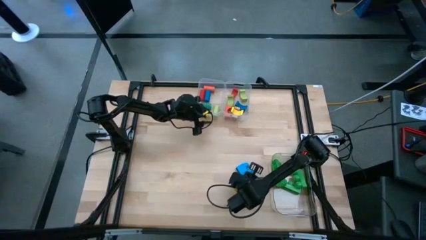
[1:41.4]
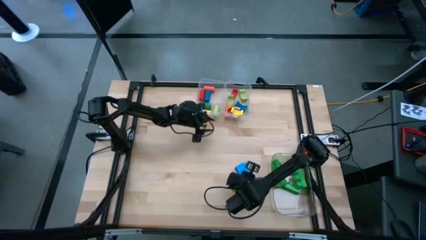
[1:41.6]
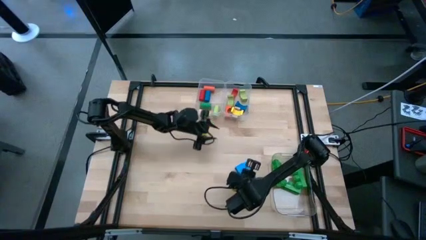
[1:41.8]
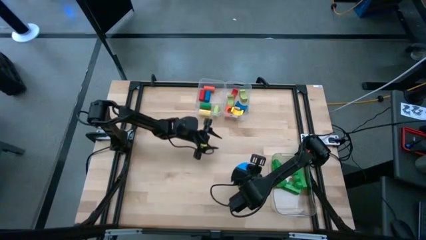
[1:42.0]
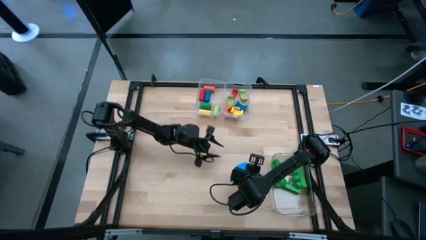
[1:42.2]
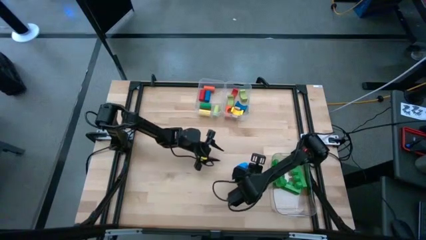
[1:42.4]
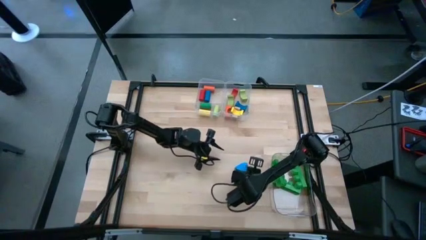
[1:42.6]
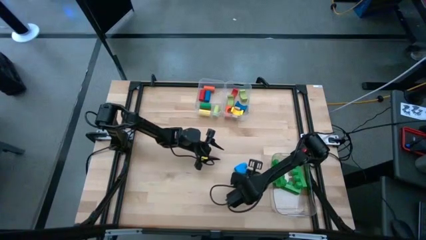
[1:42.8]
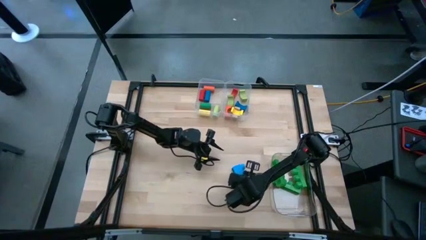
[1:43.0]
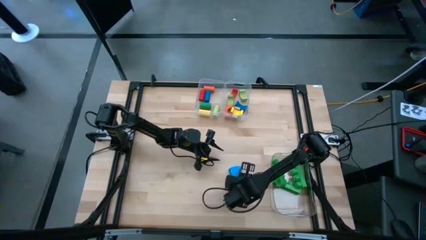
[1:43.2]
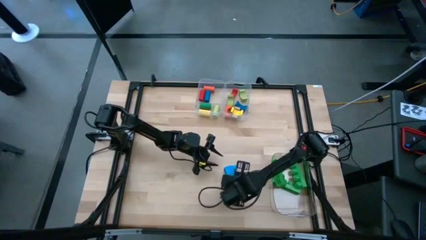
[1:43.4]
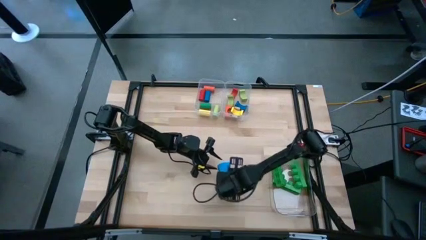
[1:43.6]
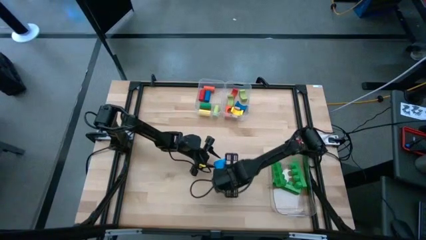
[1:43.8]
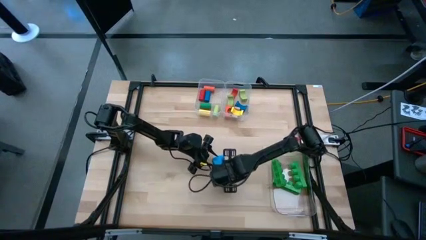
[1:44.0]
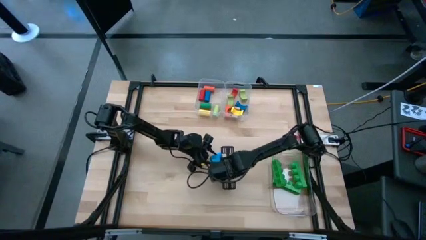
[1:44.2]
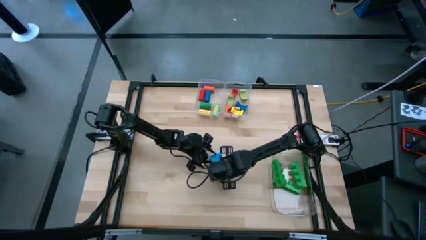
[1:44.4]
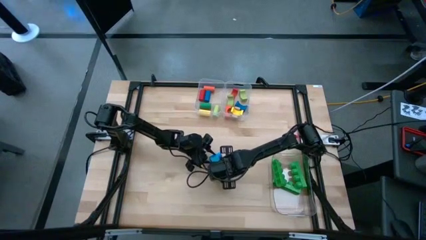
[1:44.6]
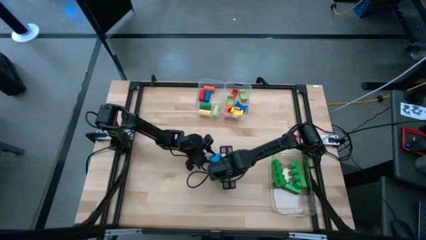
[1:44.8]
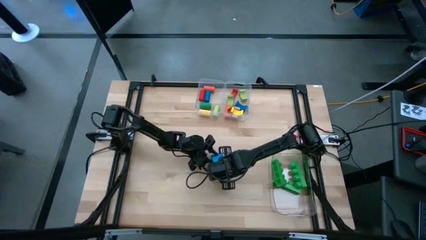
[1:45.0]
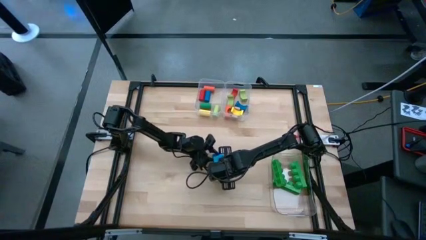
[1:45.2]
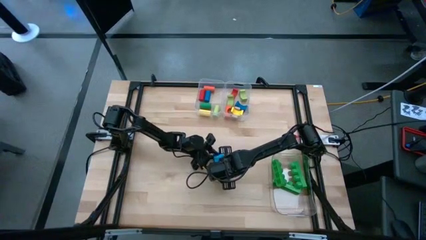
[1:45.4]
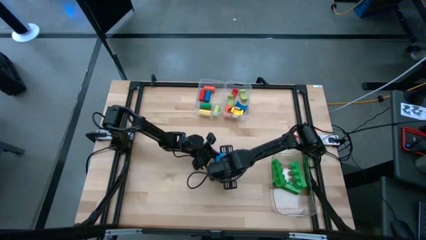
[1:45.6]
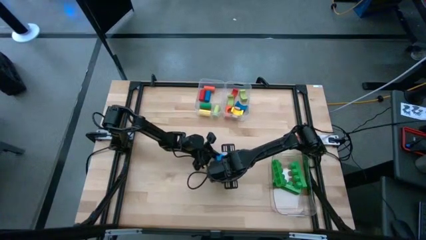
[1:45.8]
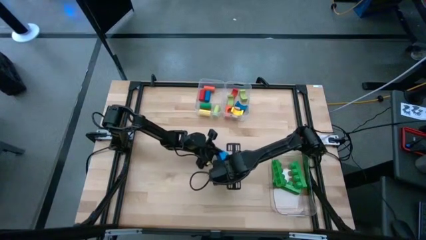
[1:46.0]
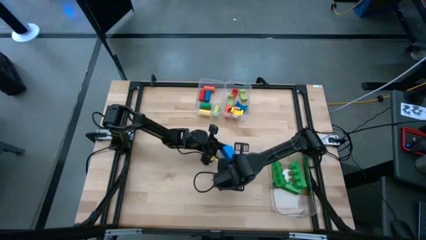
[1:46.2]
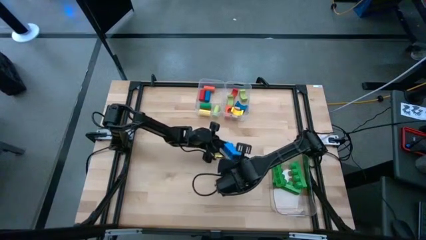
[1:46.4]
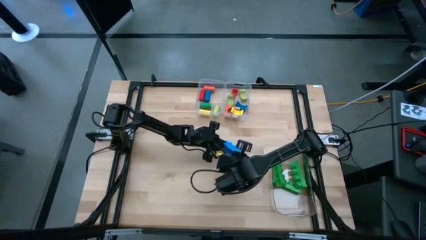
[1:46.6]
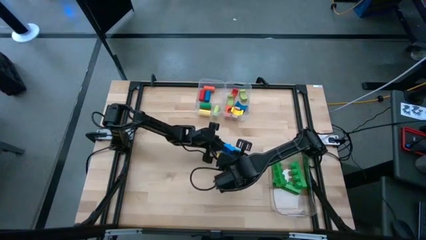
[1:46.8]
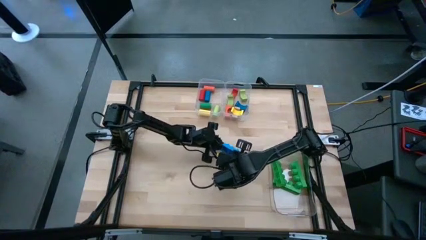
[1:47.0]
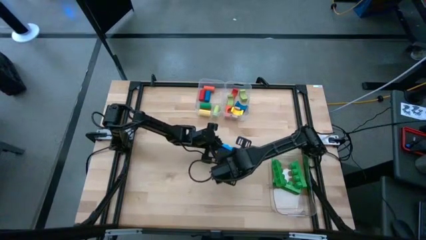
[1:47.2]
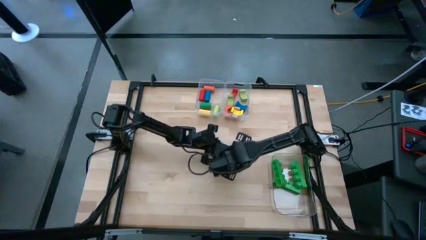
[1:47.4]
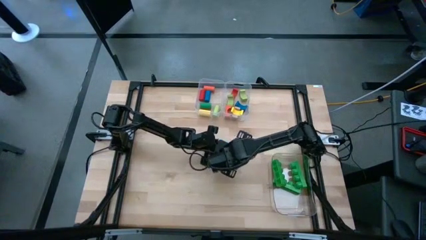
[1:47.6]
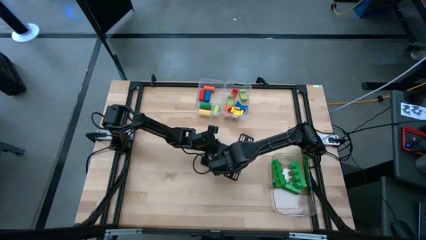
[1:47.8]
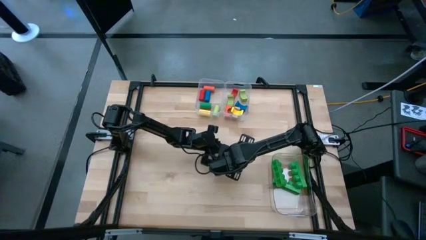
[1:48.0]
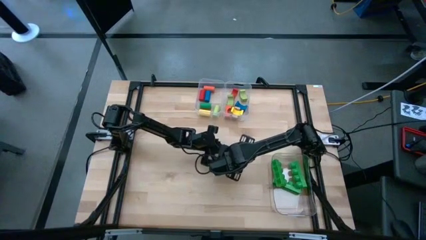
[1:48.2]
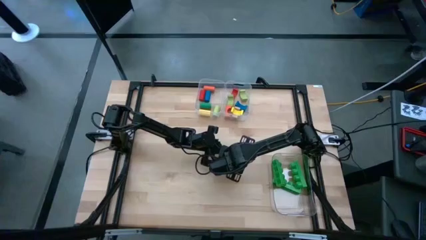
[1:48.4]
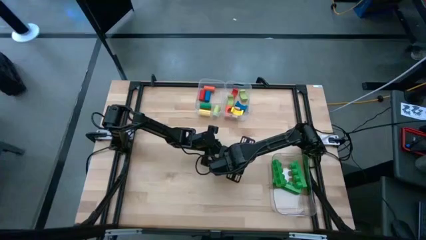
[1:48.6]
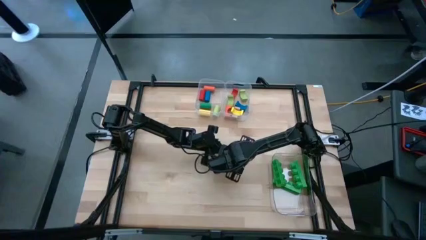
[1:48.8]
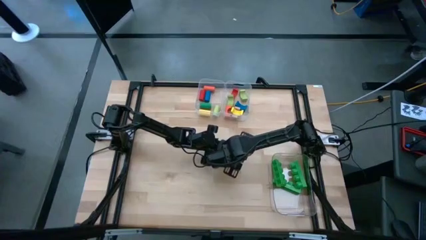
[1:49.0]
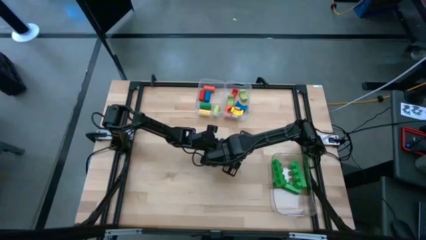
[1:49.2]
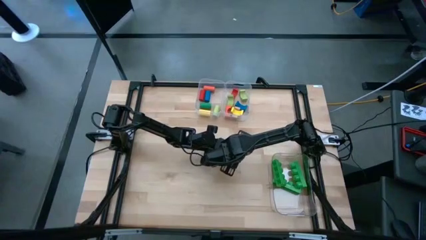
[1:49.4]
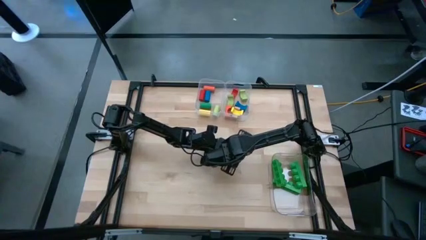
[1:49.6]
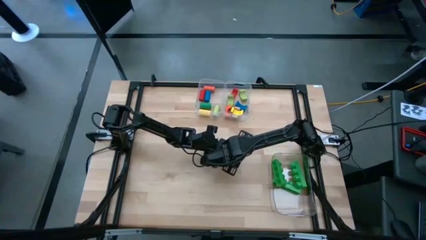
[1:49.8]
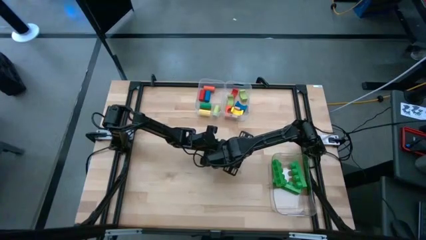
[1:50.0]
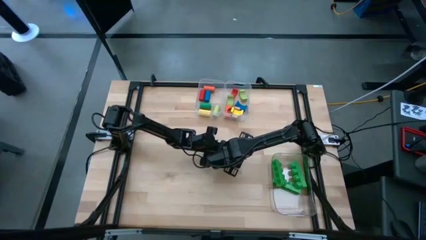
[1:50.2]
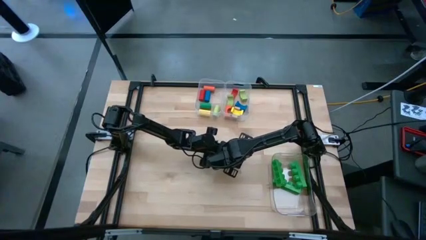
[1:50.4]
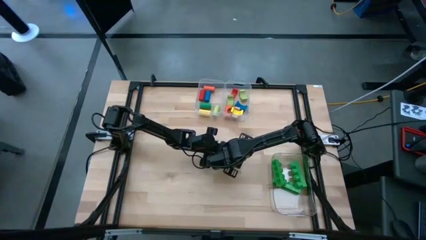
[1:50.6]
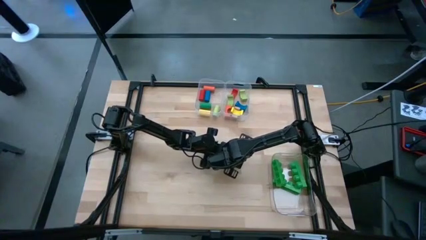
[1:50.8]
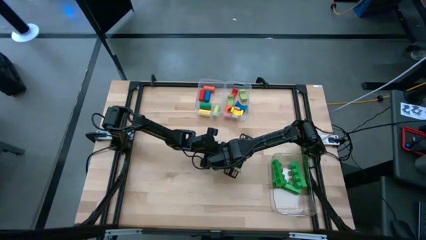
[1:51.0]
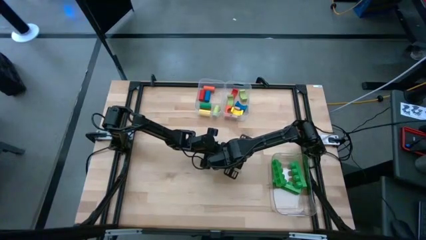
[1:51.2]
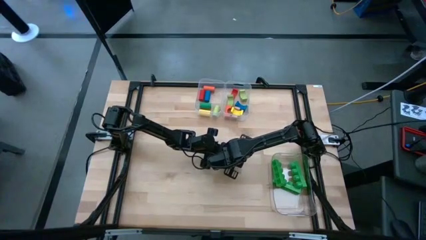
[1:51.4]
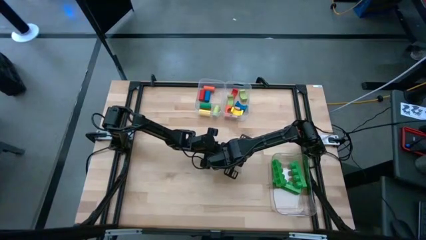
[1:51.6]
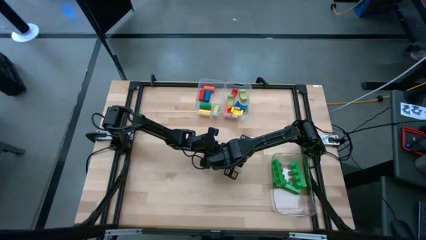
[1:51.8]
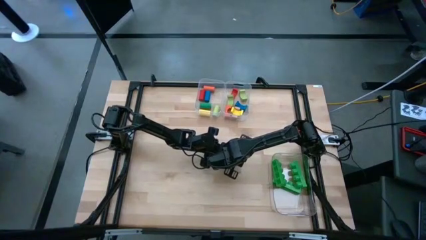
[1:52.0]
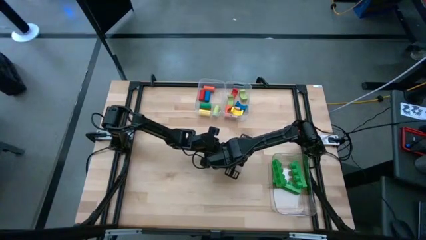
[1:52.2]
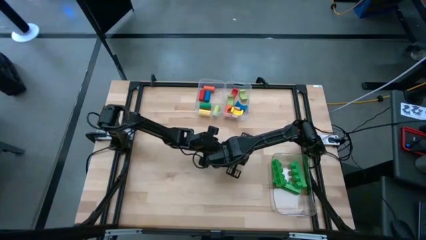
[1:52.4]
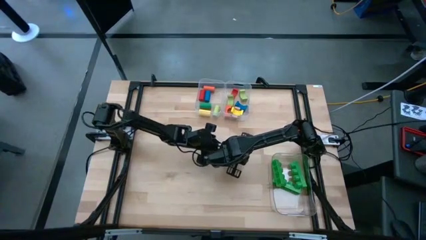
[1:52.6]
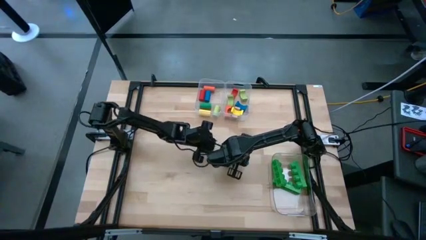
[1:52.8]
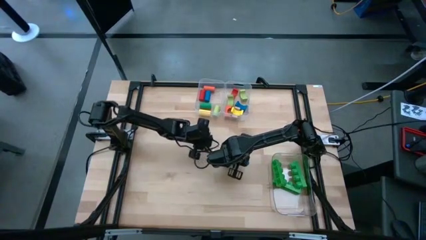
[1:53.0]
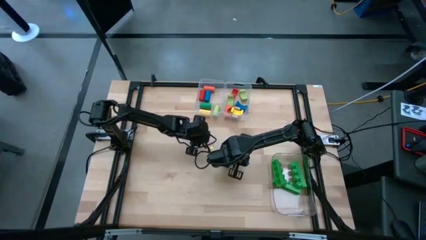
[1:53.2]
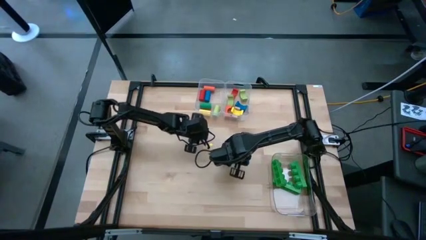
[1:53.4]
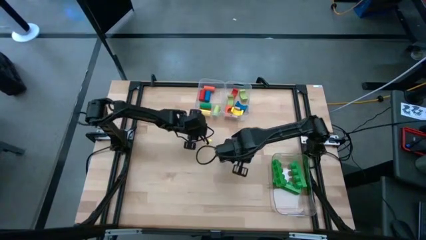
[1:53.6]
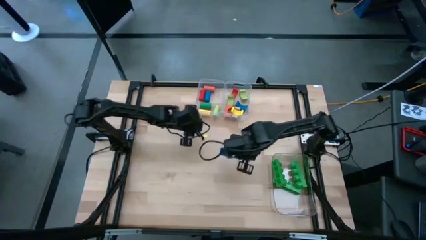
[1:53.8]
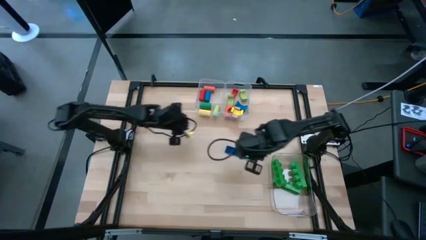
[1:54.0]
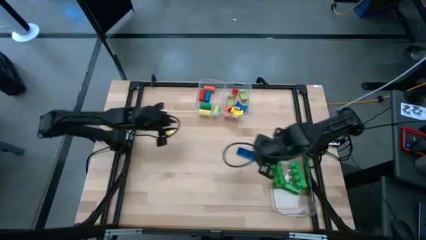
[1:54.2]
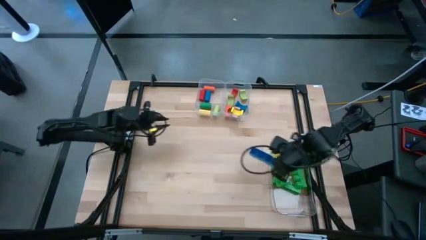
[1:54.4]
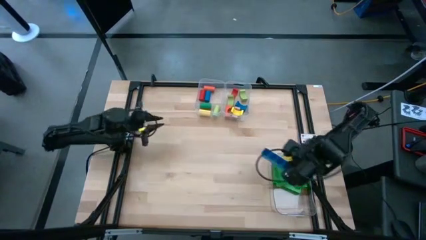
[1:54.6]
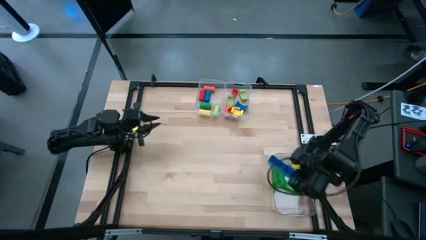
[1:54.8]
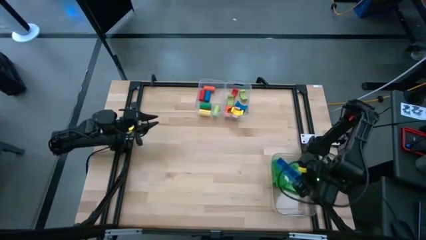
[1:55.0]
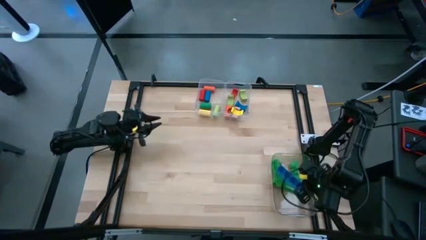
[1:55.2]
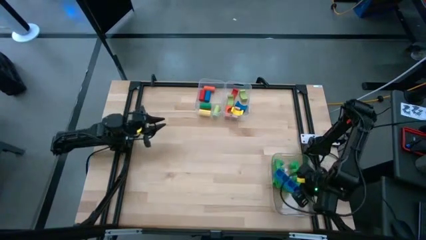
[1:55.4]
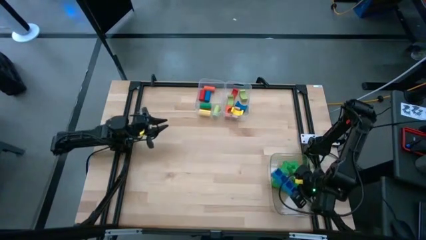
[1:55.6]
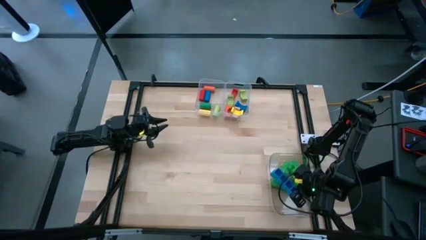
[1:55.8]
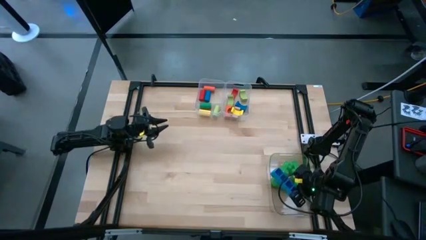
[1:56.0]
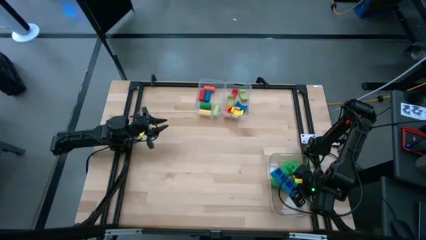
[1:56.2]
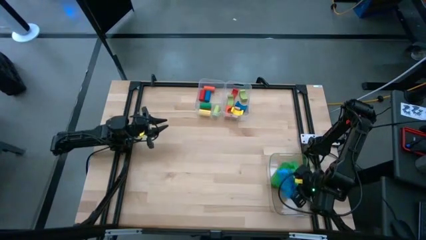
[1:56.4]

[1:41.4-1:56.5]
Task: Sort blocks by size
Put the blue 4 stud game piece into the bottom transparent bin

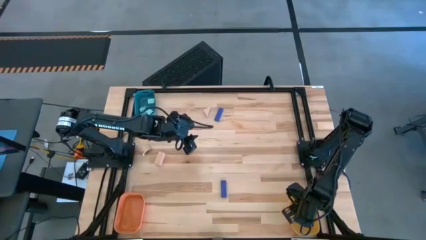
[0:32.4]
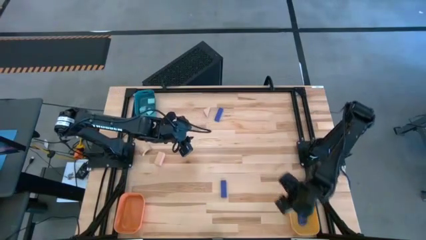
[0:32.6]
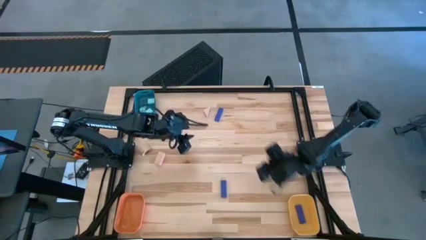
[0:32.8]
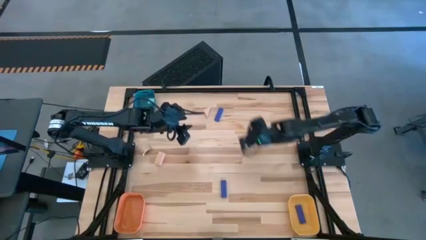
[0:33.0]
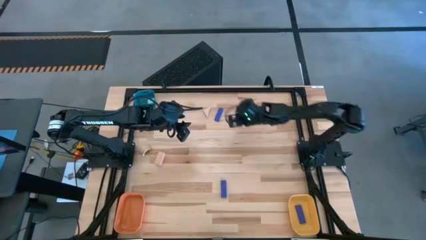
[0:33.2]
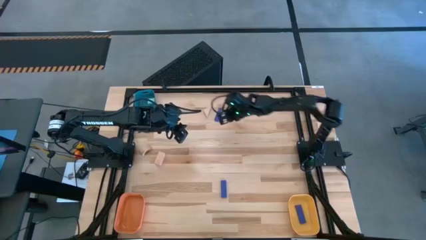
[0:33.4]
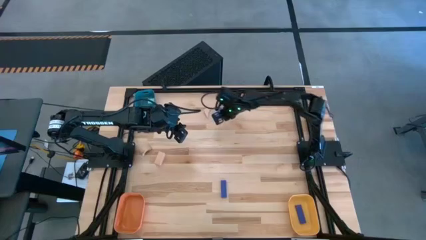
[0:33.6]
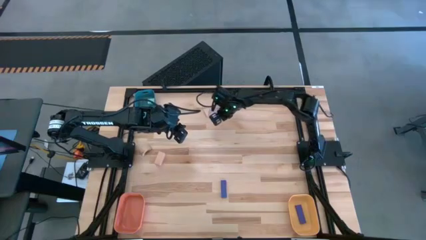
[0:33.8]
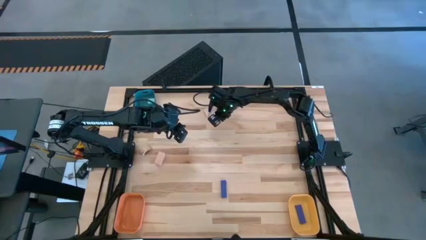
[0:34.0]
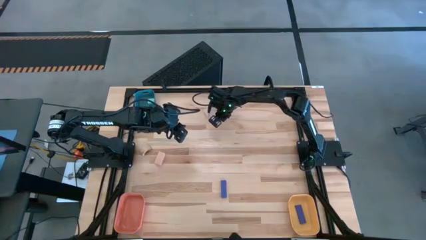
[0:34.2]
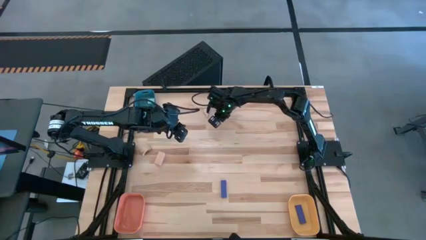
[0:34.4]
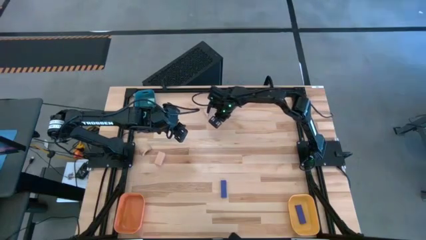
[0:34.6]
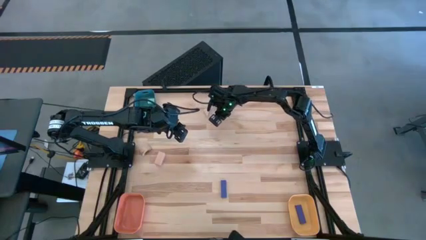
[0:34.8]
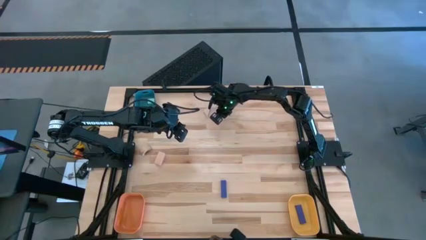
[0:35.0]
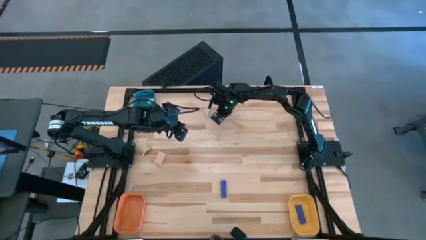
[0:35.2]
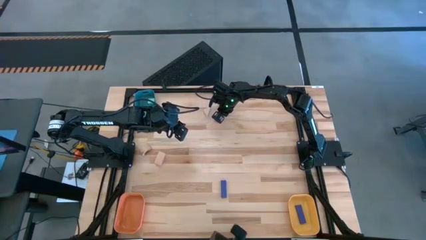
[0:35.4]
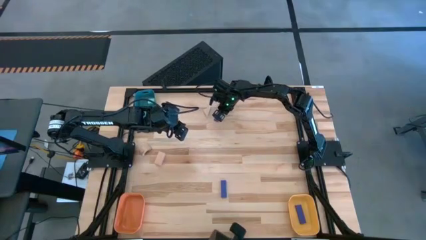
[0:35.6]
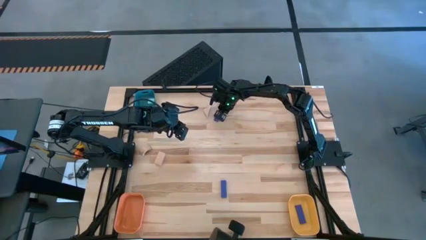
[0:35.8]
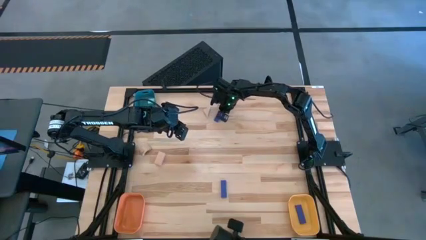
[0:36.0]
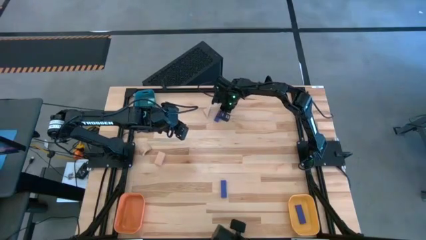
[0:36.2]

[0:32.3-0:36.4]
Task: Sort & place blocks by color
Put the top blue block into the yellow bin
